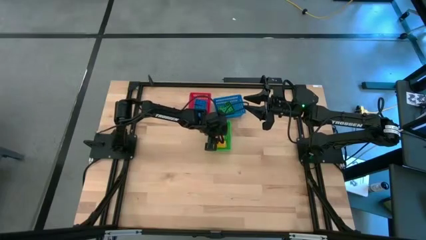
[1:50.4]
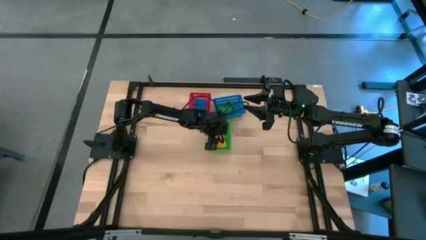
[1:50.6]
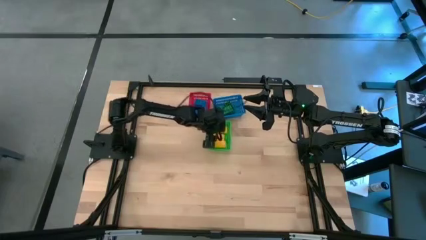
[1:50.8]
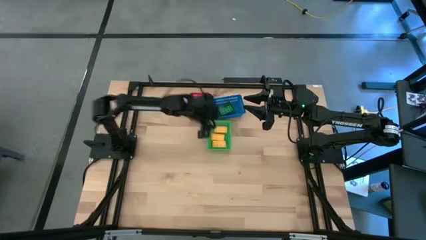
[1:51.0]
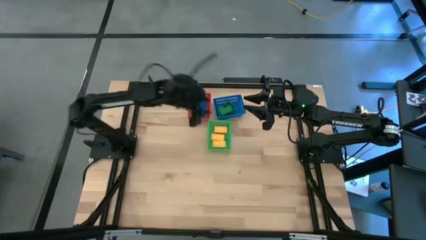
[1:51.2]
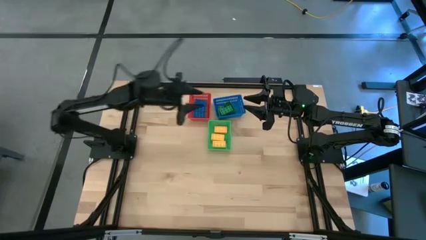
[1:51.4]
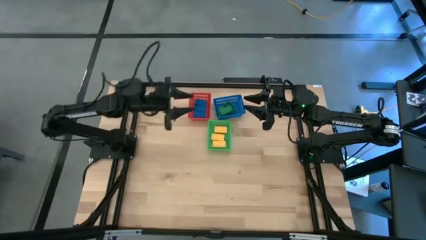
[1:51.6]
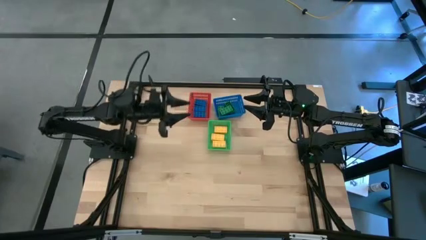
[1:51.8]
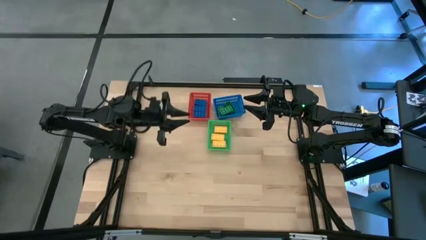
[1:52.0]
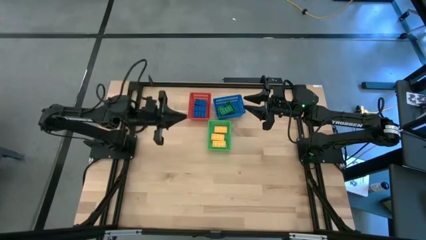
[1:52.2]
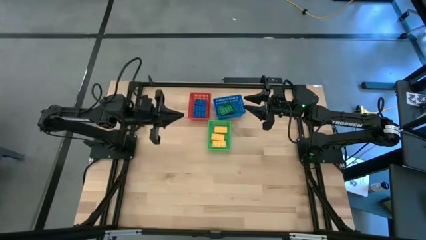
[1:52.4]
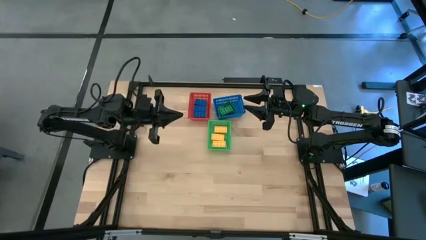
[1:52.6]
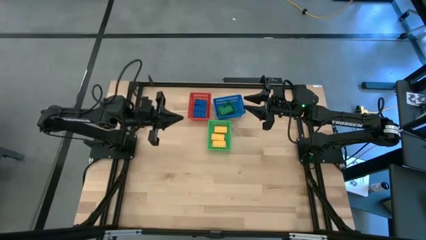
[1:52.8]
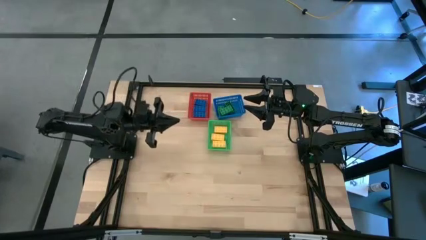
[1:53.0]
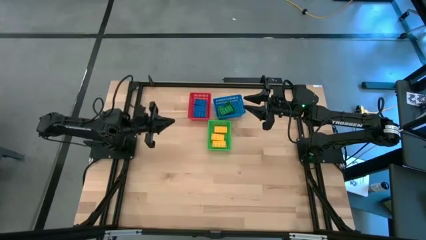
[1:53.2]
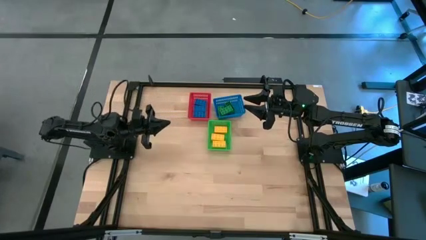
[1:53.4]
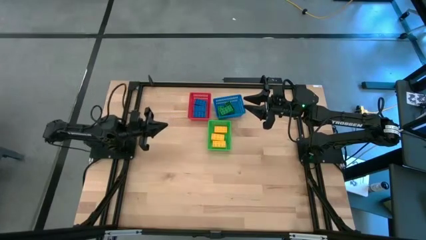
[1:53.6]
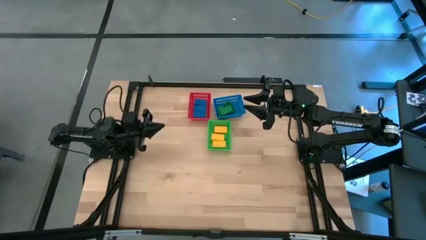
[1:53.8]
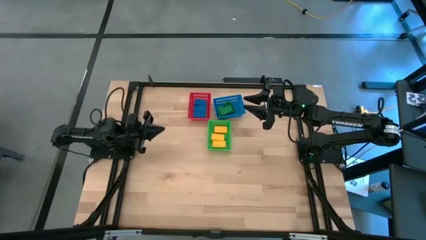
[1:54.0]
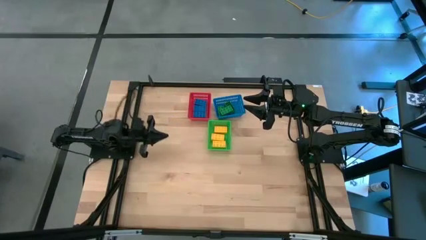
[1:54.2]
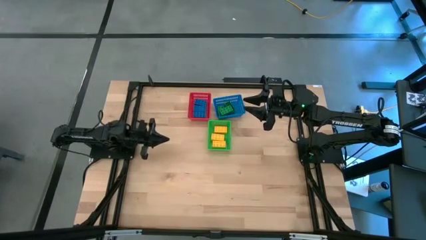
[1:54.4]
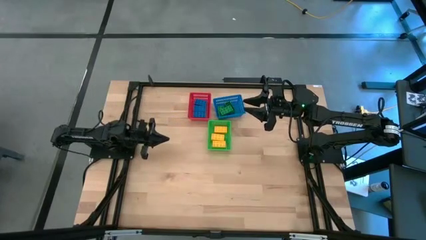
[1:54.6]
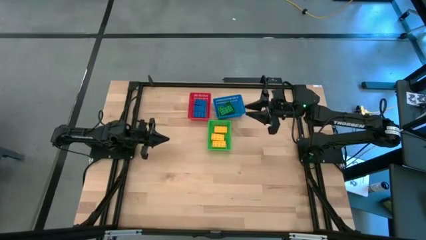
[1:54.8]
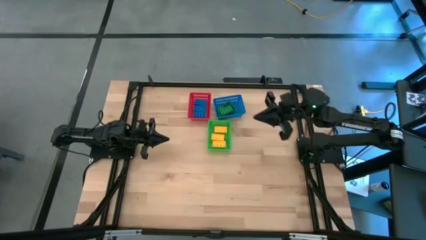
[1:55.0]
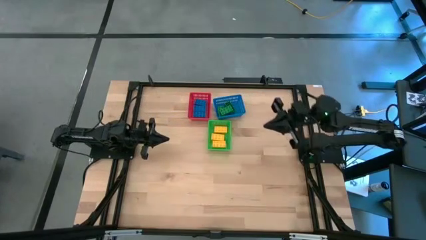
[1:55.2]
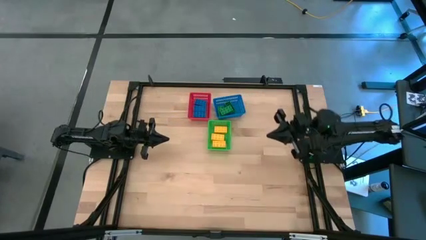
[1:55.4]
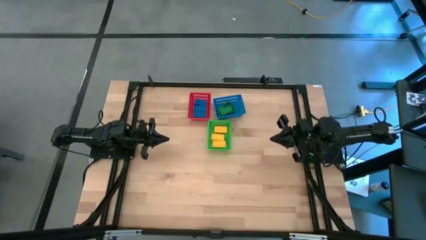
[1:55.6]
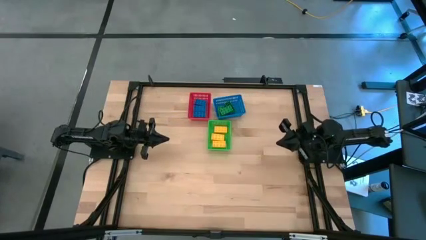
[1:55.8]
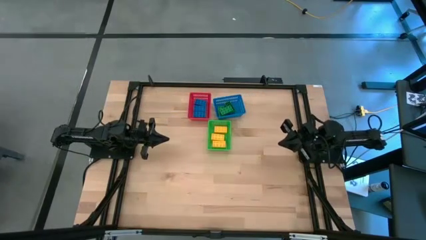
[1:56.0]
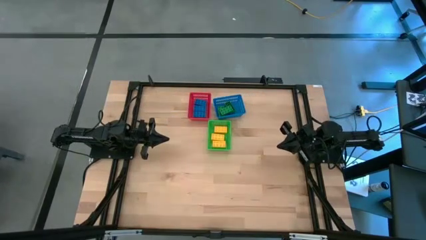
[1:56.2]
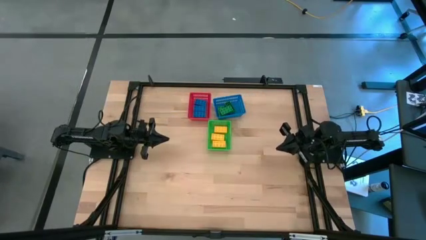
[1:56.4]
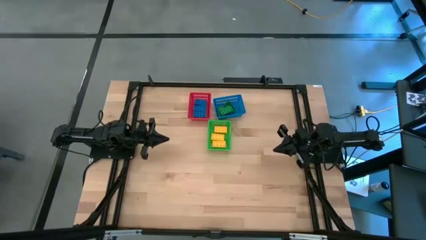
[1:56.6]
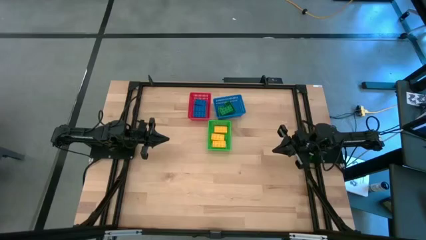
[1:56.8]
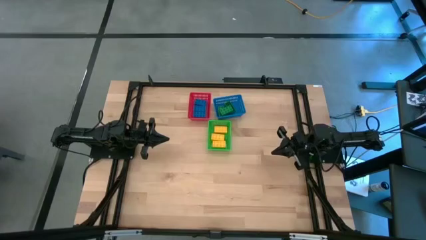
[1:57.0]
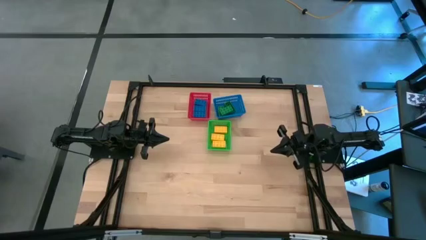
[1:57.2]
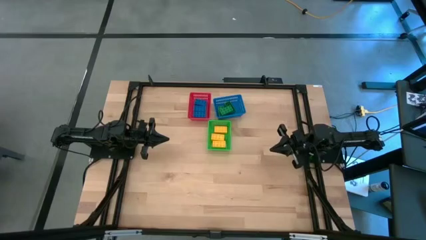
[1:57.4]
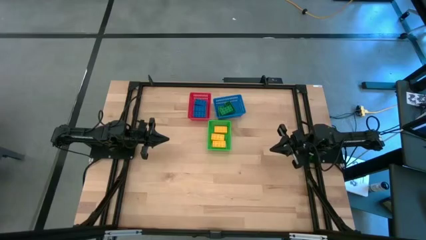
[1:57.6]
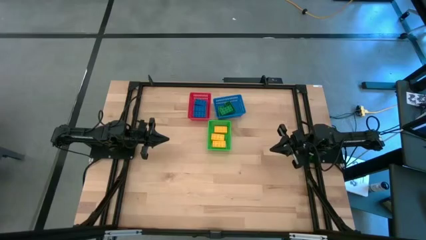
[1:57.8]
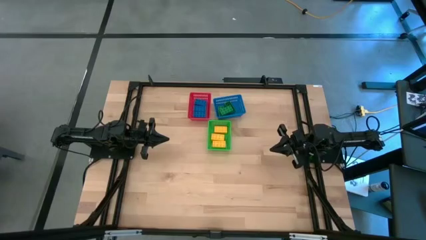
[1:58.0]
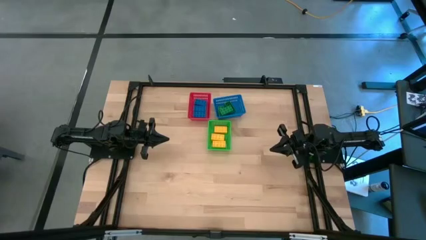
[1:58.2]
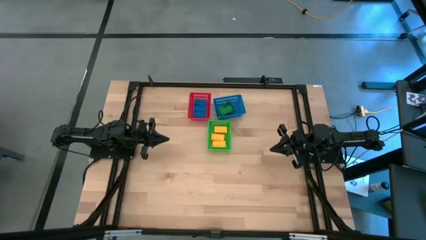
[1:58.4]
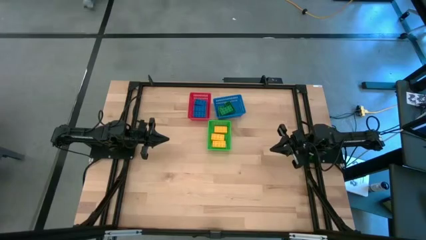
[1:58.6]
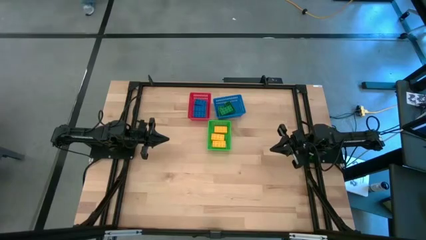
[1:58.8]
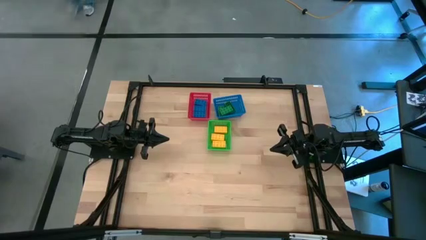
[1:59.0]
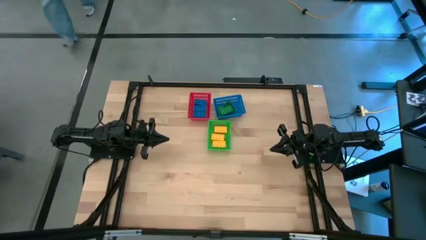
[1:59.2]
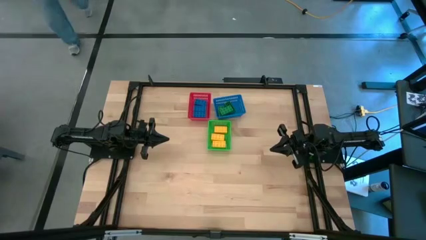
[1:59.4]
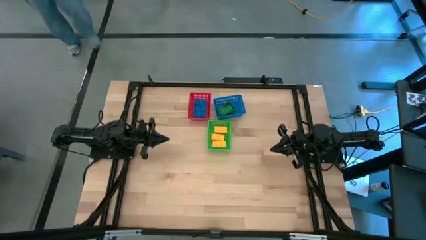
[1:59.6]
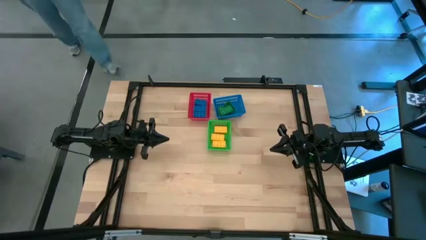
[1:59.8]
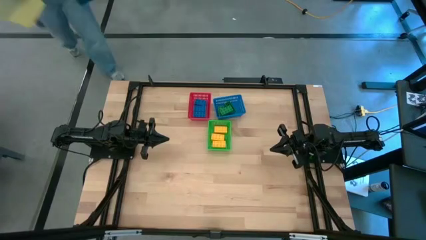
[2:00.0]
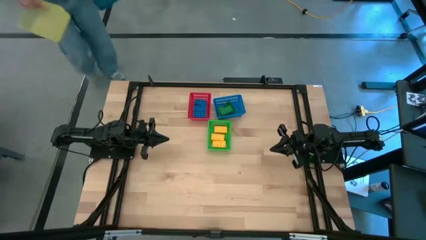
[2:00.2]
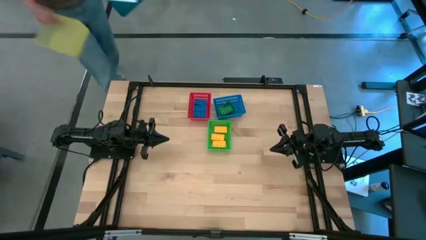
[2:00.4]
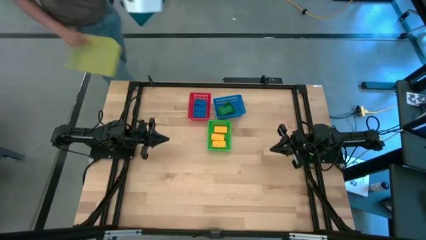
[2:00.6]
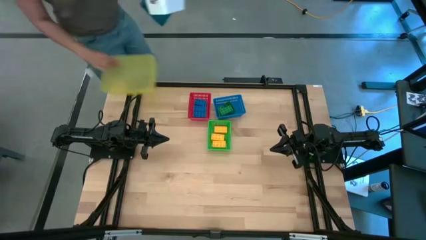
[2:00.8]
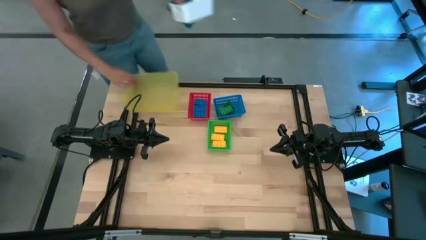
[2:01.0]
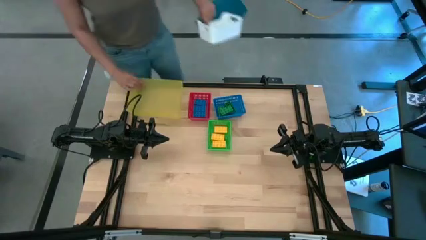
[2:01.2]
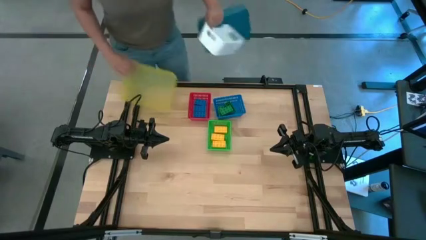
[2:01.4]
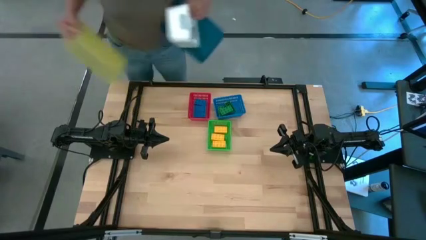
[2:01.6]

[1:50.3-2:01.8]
Task: Sort & place blocks by color
Return to Home Position

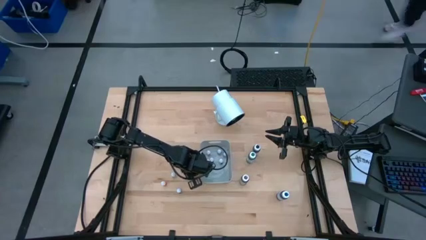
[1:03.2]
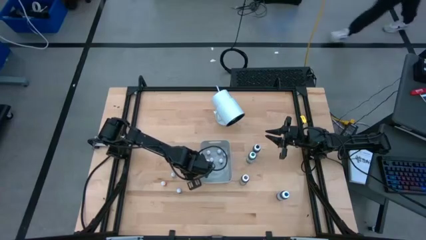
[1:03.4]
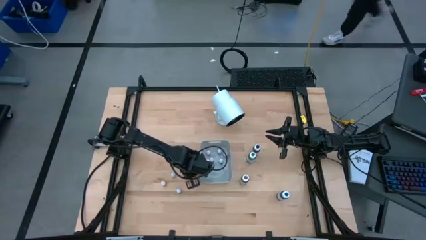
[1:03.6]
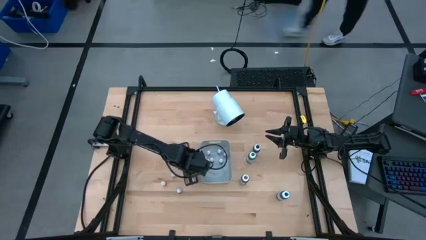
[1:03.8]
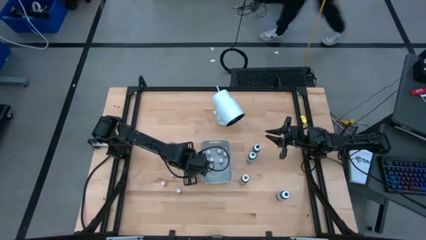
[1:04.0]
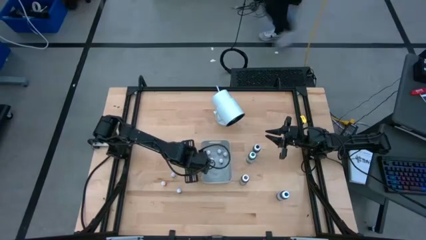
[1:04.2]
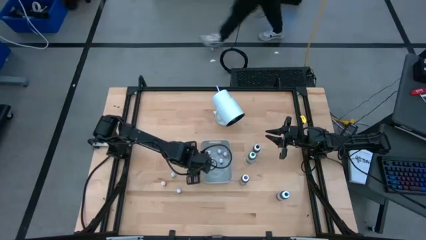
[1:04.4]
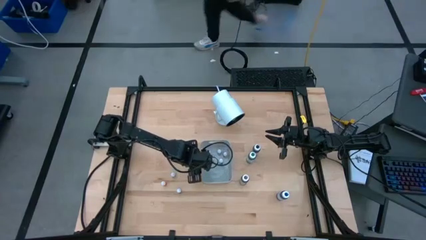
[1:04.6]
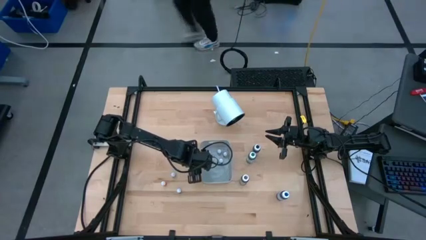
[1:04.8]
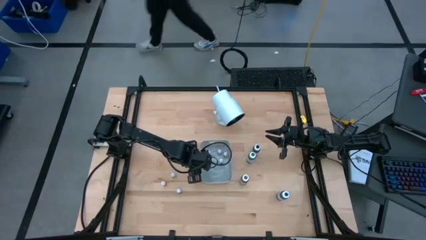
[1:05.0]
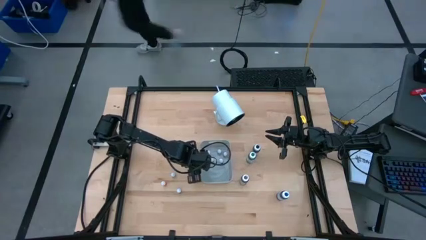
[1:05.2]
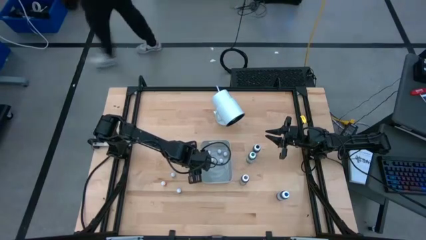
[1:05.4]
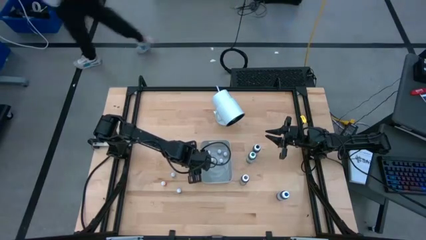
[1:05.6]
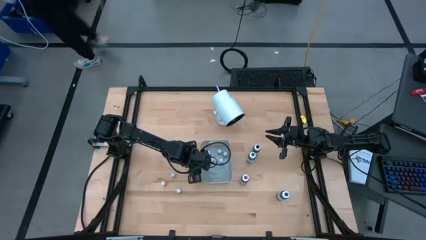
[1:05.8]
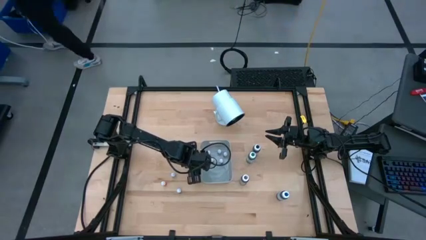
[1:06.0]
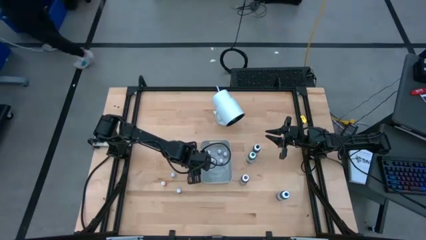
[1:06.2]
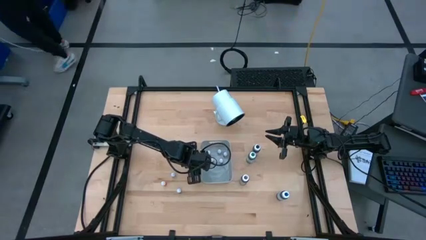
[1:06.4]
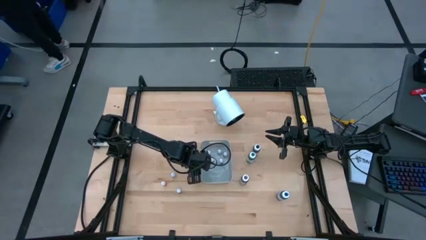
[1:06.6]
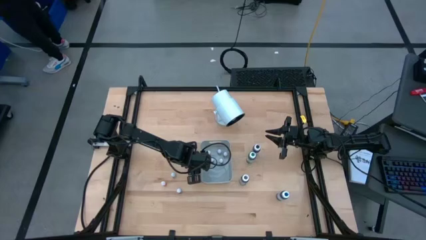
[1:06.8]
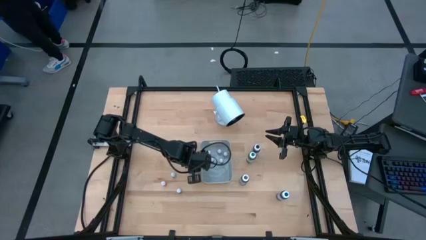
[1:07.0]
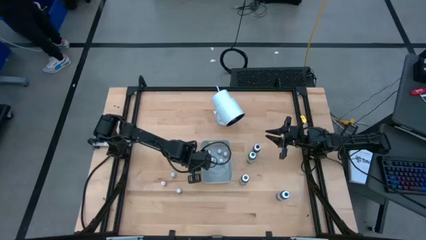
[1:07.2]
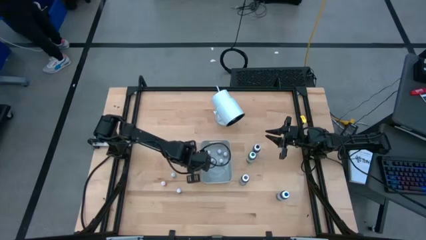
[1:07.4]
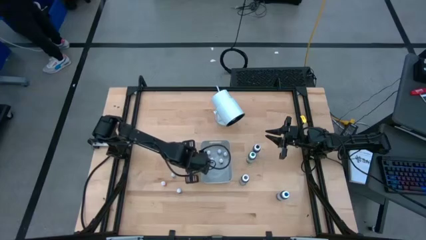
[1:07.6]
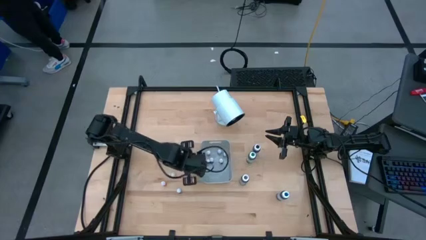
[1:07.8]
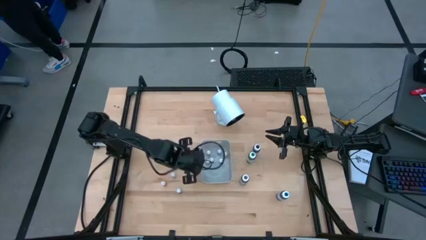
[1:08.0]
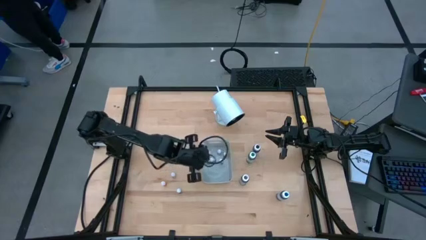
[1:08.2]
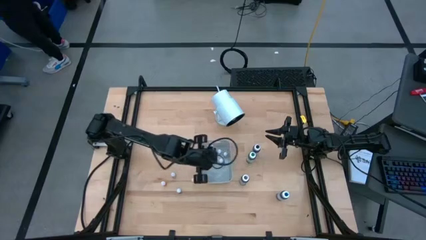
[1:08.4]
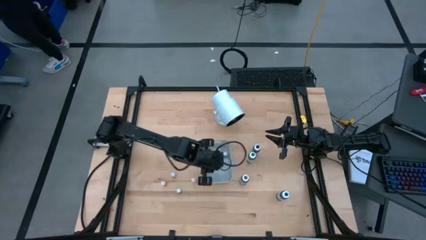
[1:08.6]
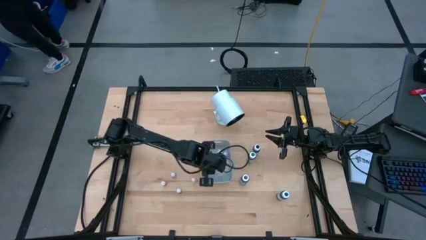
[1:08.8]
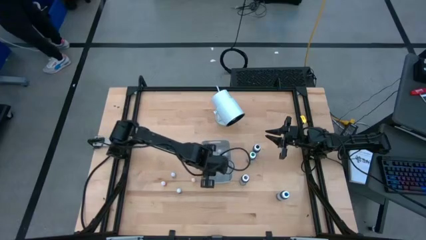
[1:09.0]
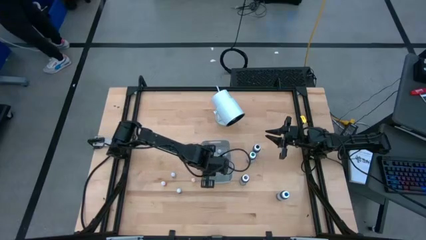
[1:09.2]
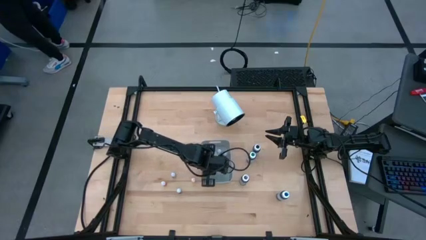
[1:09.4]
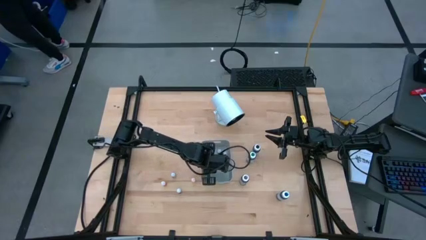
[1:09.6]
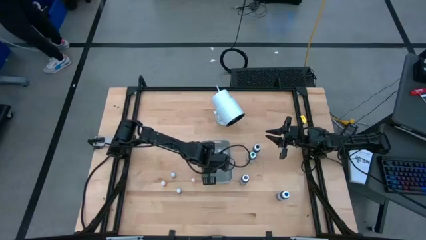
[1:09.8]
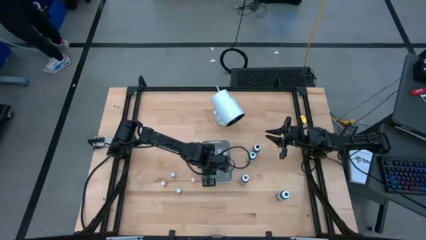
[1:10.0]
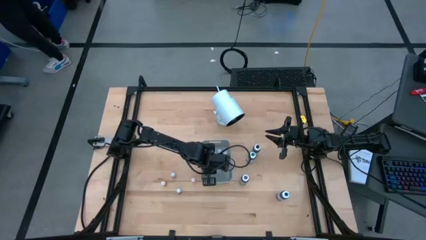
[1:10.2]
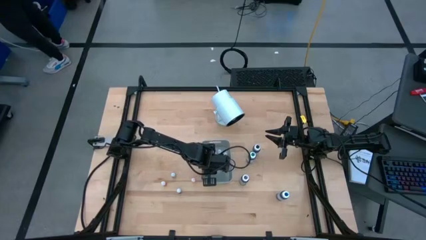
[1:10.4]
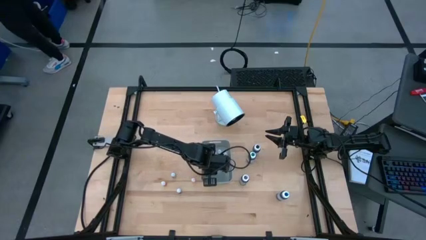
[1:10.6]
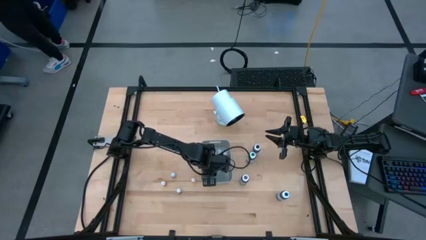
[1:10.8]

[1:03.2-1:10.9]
Task: Pick & Place food coloring
Put the top small orange food coloring bottle into the gray bin
